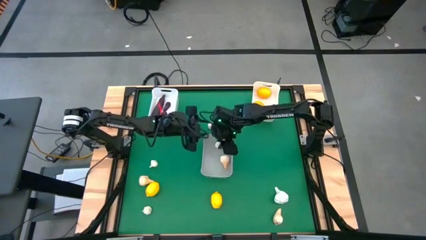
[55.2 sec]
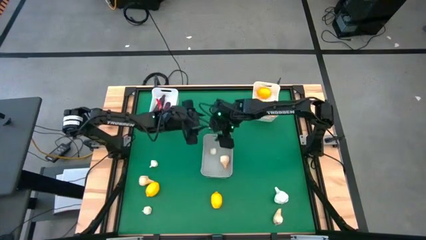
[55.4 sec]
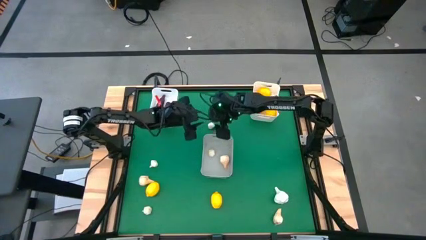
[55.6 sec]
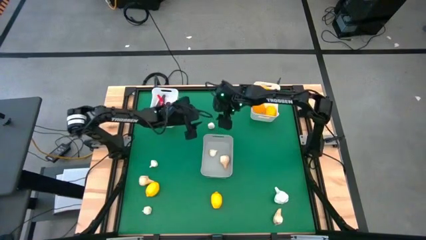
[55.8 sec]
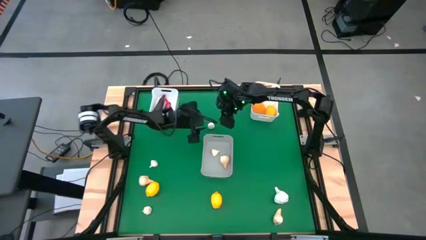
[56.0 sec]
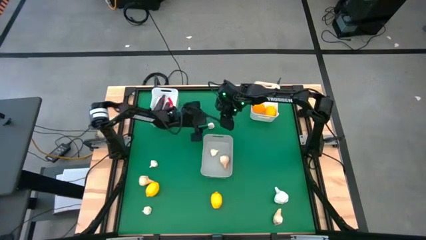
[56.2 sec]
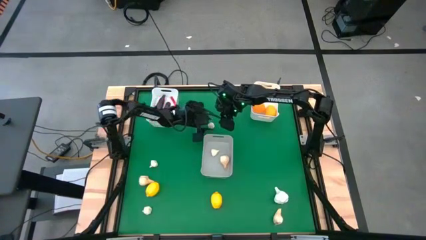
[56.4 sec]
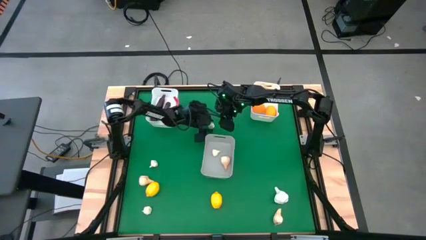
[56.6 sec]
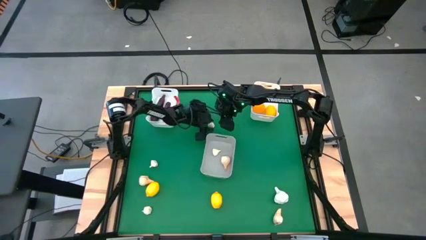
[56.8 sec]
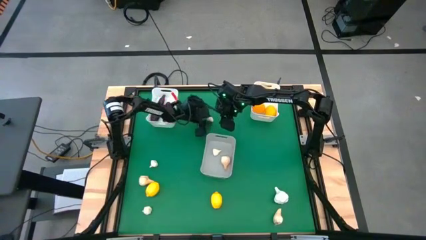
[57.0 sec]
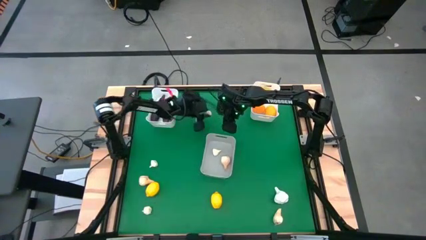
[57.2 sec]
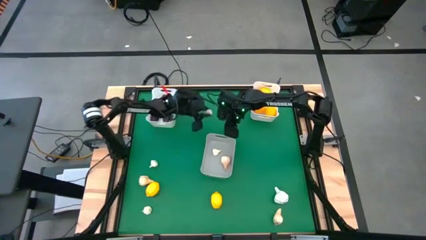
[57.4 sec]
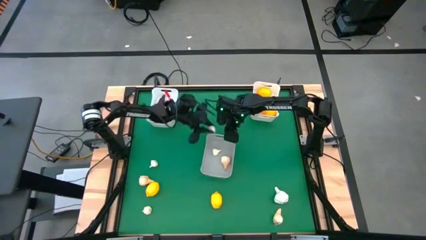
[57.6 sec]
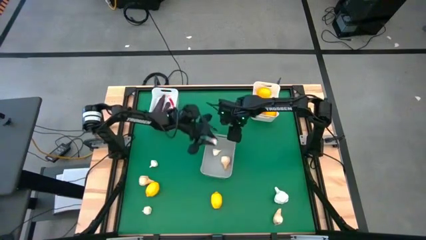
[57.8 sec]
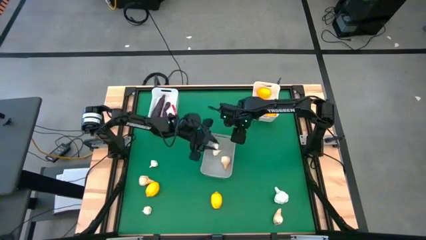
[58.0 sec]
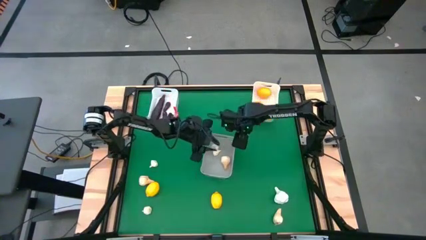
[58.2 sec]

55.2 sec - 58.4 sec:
Task: Sort produce into baskets
Put the garlic into the gray bin

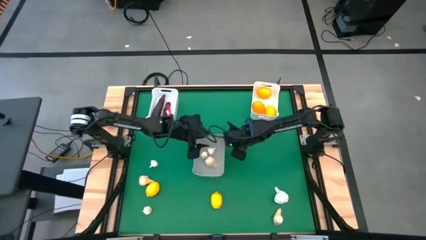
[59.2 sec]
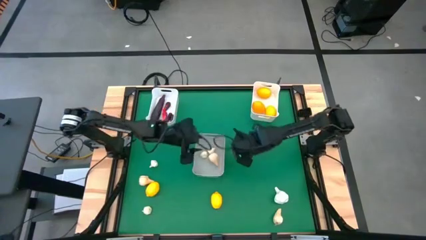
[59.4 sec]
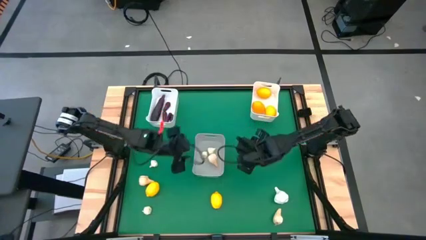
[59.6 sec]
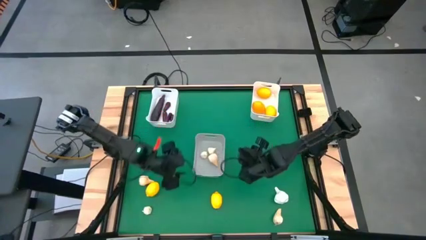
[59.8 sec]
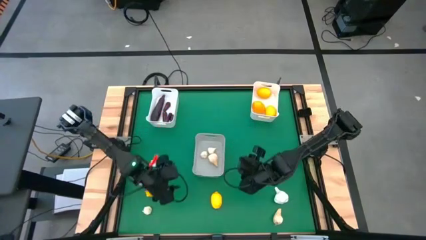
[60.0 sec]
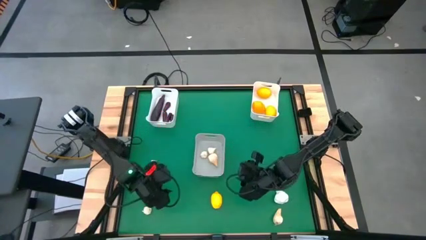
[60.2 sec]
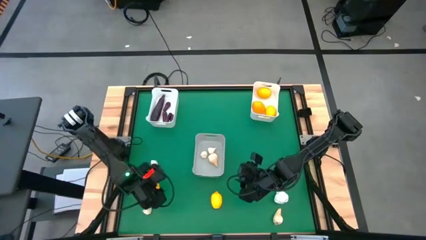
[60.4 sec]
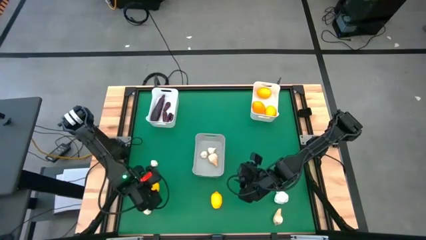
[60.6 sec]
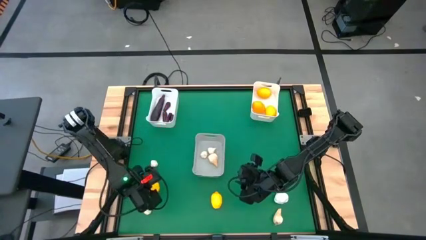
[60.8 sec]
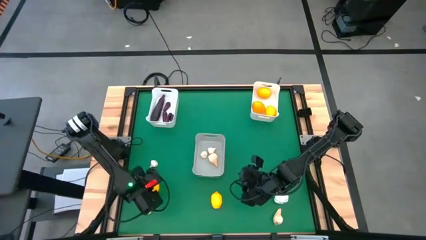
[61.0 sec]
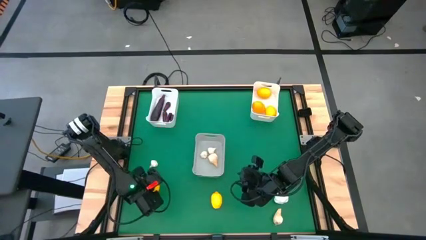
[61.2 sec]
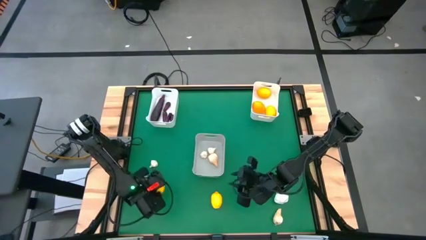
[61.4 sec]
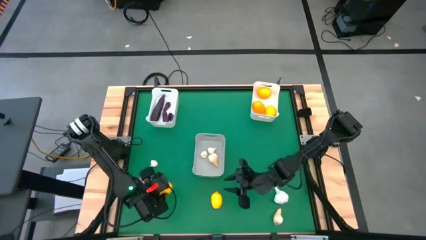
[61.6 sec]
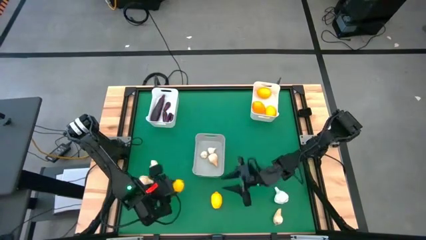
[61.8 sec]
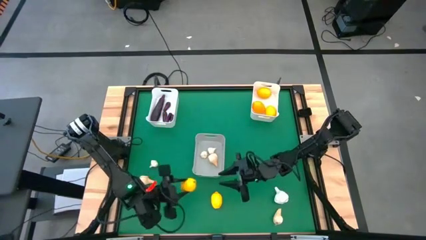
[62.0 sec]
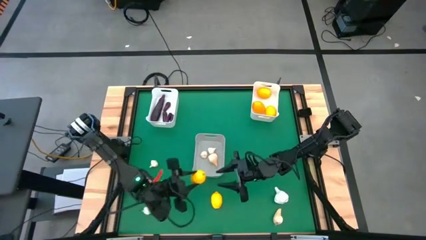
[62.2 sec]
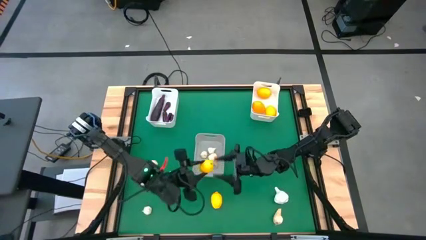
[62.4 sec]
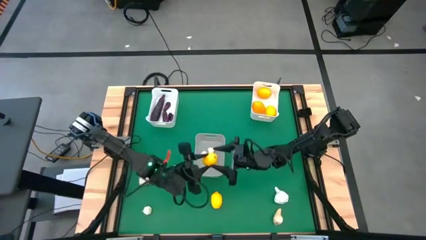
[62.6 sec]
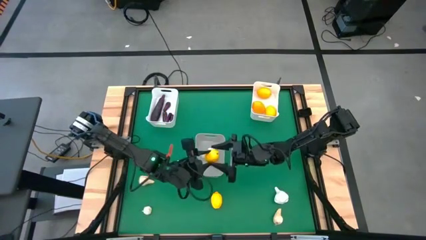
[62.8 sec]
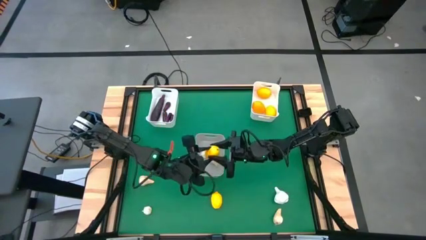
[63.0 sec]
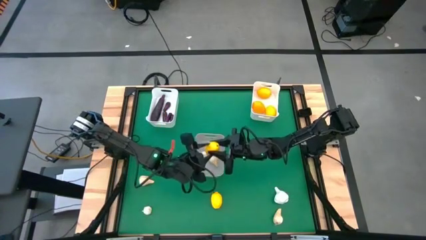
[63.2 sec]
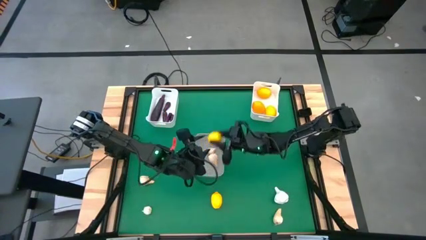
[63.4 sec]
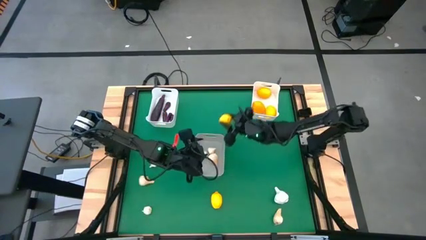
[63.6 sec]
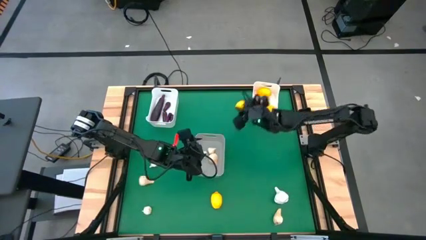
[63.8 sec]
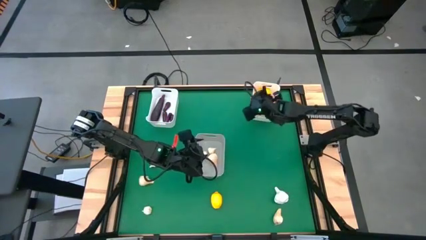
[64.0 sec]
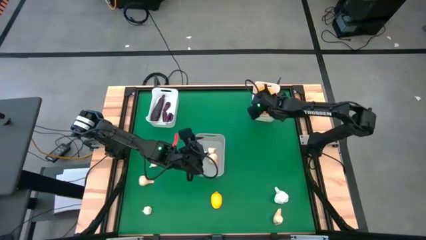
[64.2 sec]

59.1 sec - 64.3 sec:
Put the lemon into the right white bin

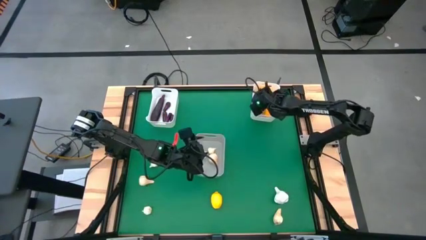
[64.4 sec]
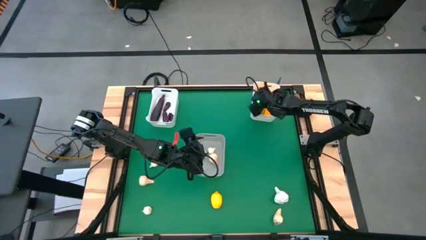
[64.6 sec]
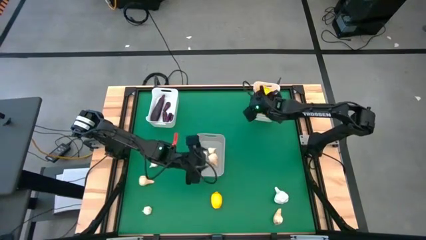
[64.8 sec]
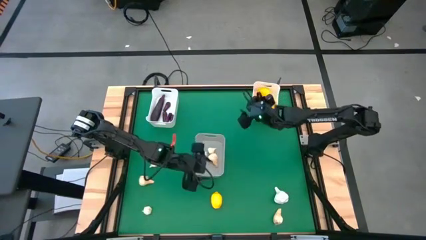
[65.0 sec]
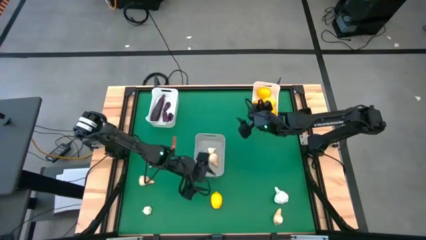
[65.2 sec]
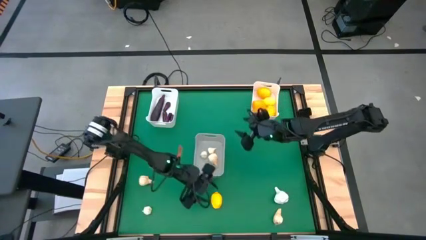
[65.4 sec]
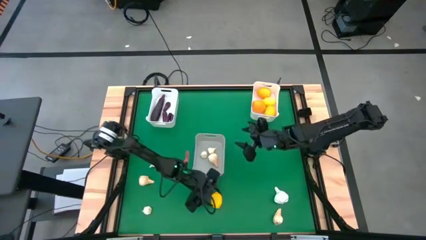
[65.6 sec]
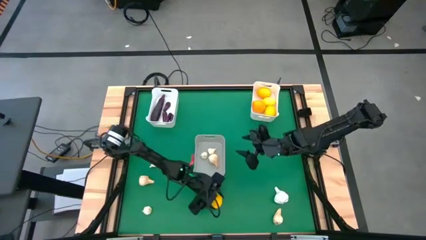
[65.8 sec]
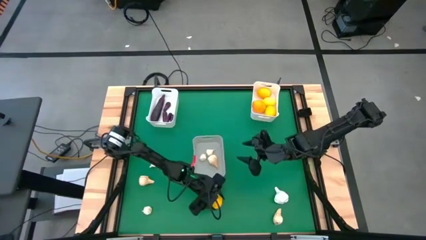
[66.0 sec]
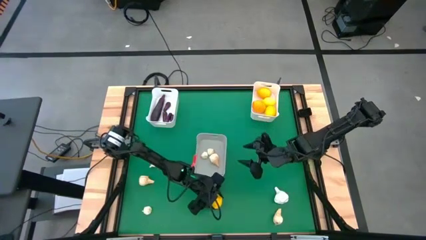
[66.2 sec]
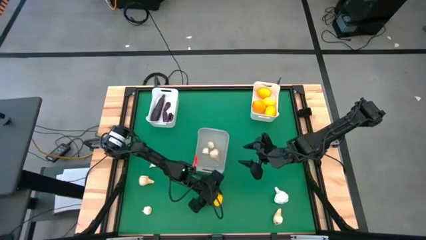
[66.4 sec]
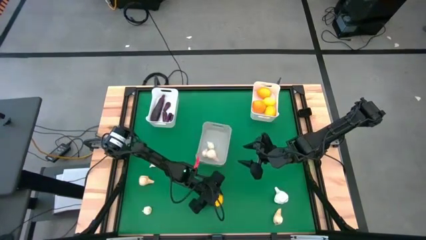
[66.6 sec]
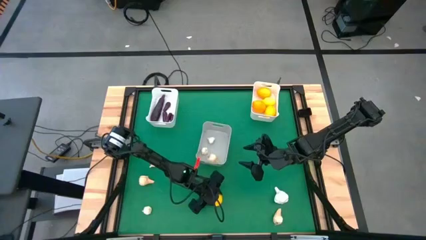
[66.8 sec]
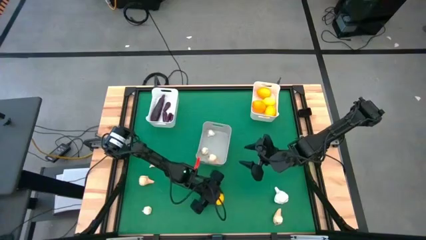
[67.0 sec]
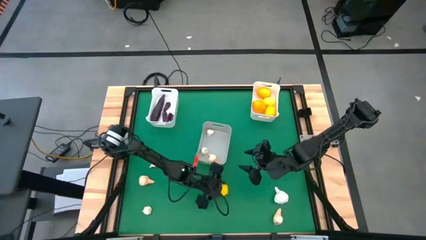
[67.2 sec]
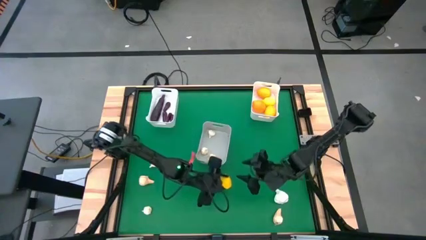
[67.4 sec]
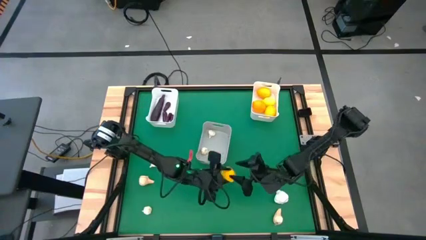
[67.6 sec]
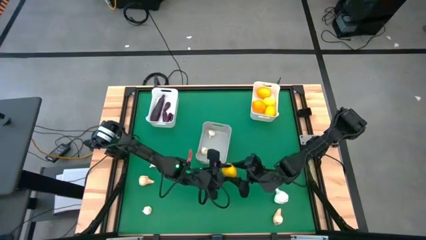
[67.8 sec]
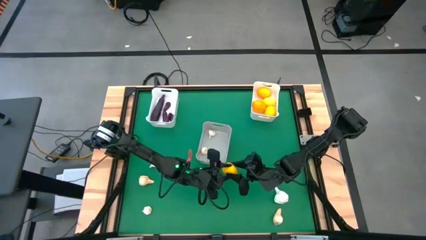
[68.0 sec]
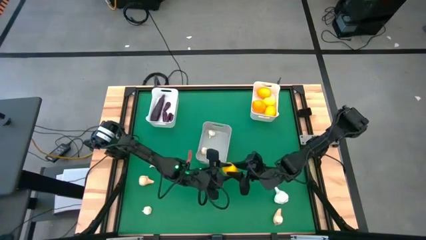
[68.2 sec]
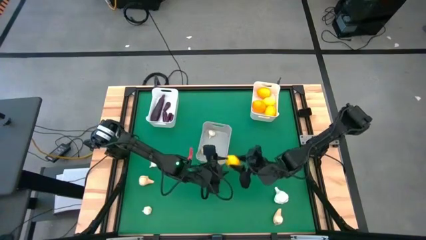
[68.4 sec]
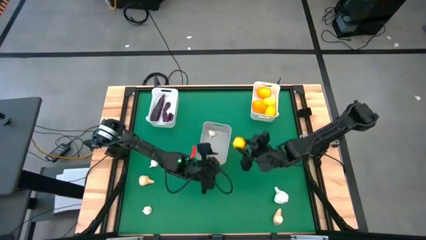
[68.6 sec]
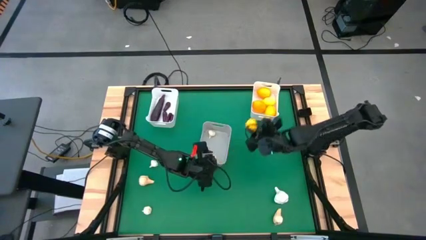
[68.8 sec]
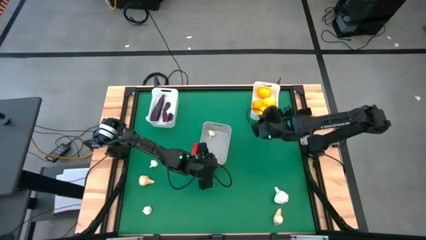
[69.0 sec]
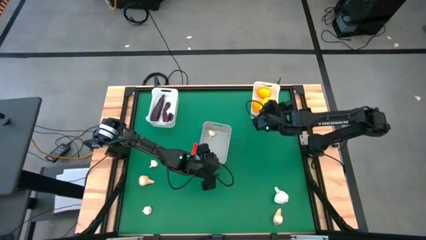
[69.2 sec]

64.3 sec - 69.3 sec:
Put the lemon into the right white bin

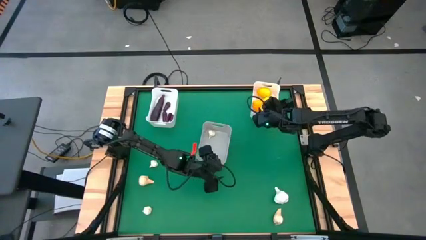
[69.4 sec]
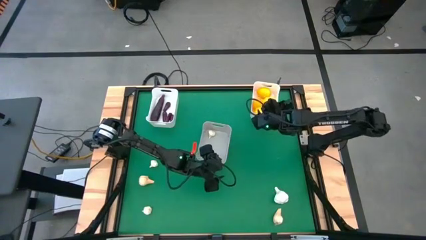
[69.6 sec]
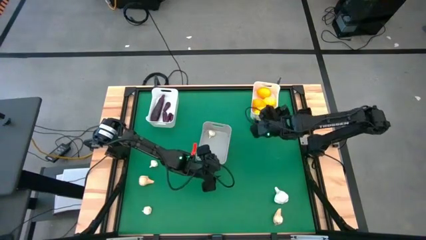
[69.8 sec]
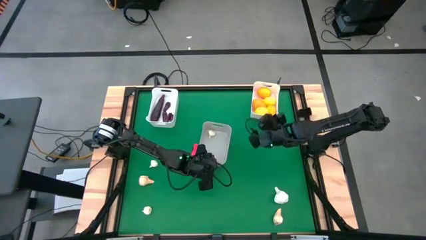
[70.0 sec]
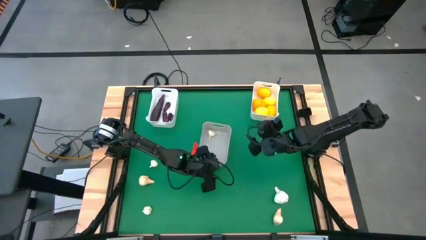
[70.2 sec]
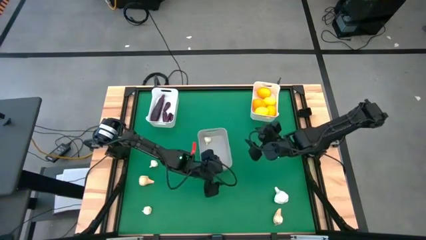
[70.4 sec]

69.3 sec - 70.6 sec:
Adjust the gray bin

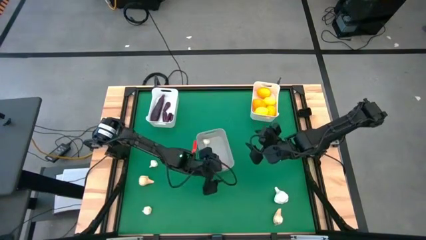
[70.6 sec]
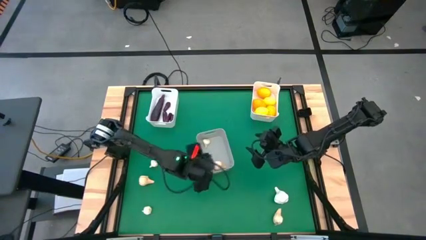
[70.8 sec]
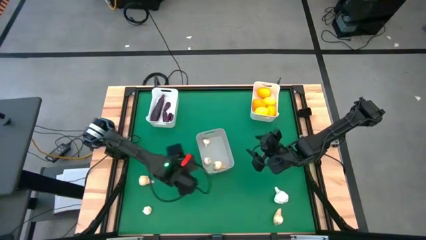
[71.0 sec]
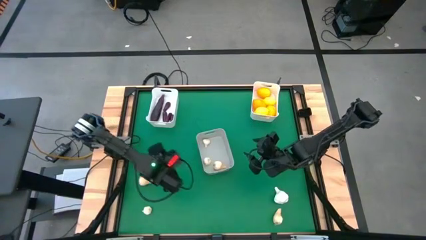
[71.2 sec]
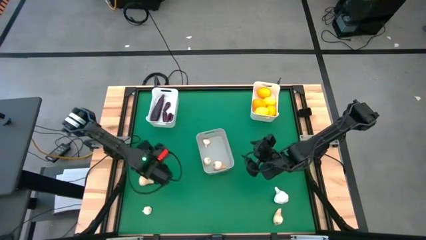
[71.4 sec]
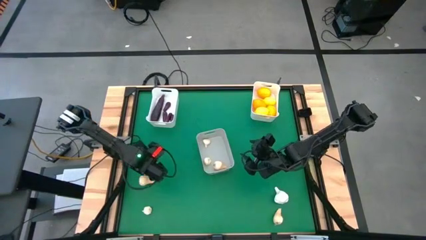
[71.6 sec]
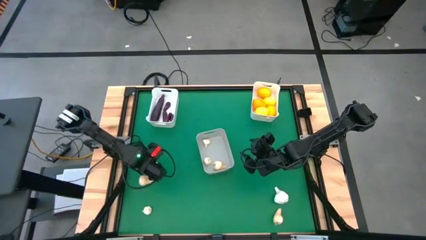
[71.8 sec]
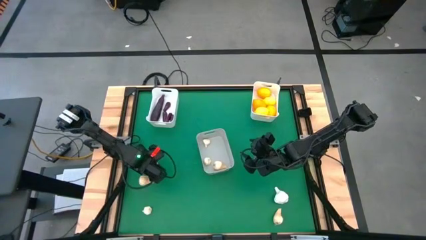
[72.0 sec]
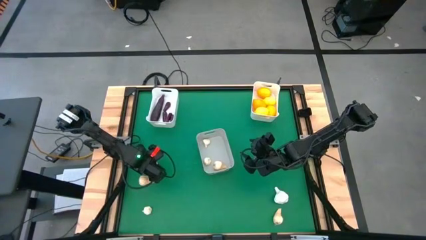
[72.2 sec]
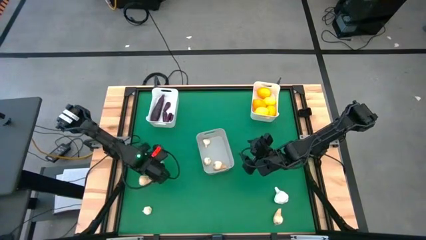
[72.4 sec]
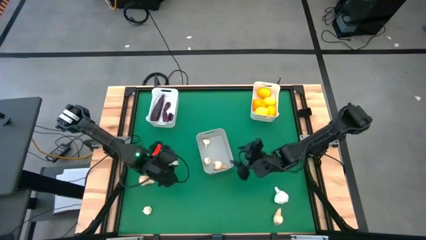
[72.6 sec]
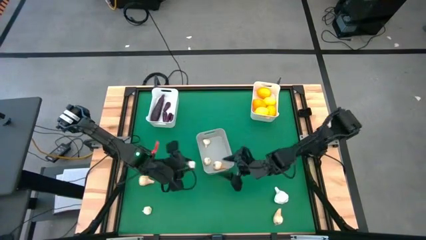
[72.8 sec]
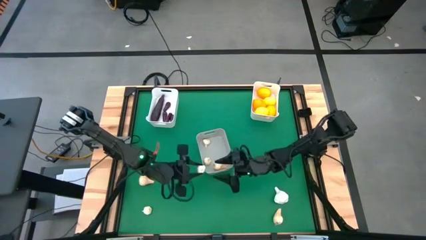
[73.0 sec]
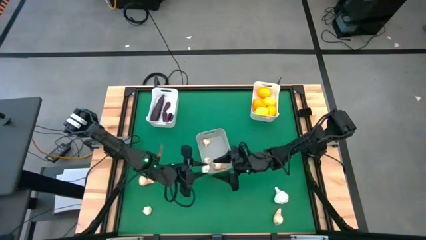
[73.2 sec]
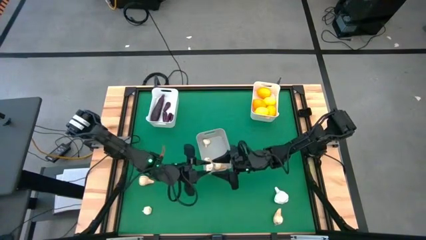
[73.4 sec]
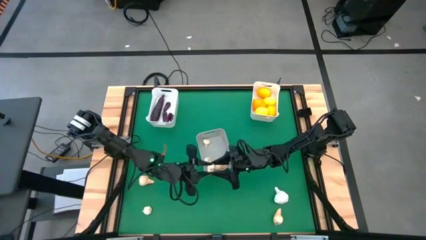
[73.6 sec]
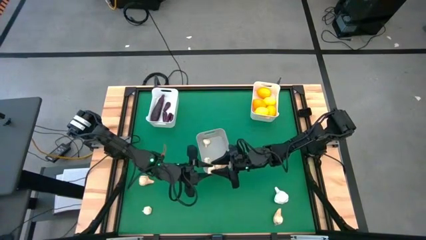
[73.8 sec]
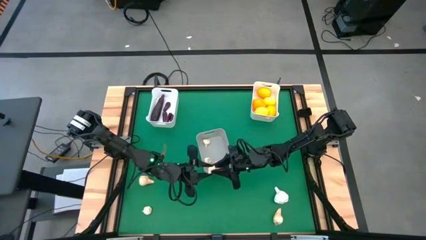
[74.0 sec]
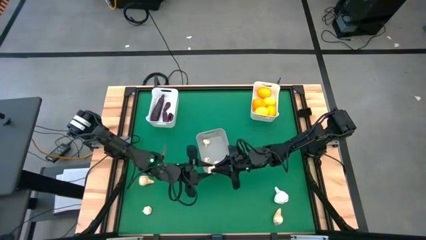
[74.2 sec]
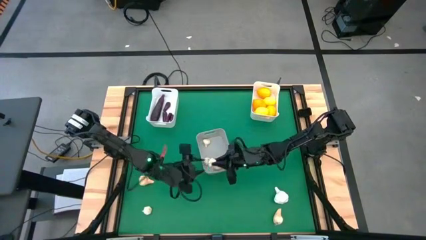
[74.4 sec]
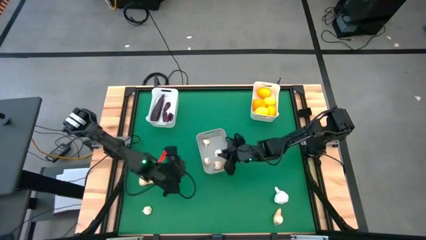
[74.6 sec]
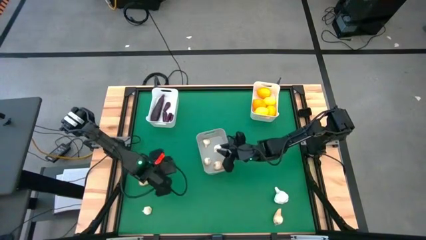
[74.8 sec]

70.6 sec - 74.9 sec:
Put the garlic into the gray bin
